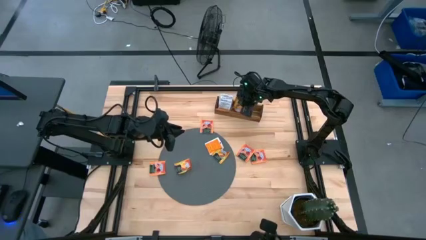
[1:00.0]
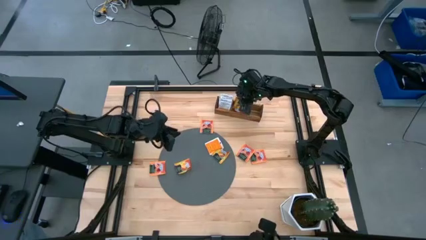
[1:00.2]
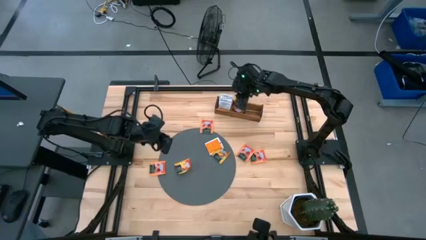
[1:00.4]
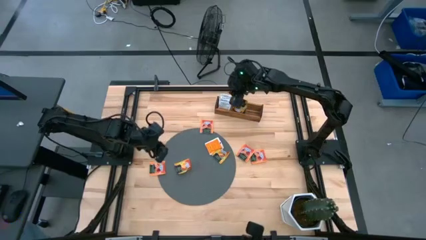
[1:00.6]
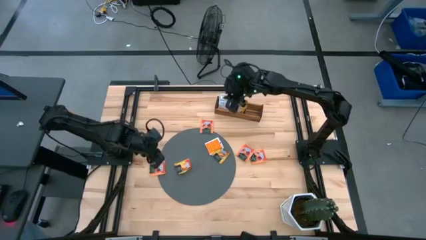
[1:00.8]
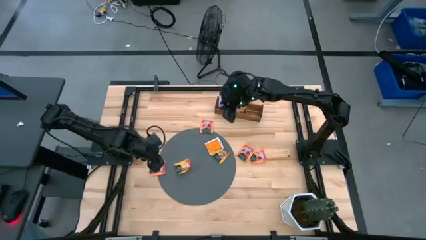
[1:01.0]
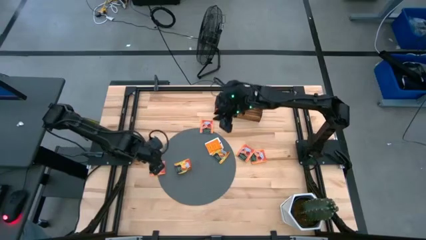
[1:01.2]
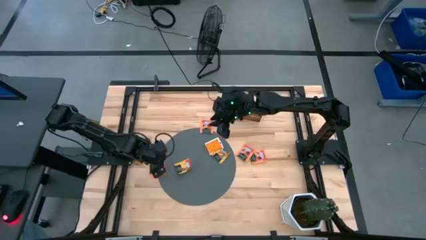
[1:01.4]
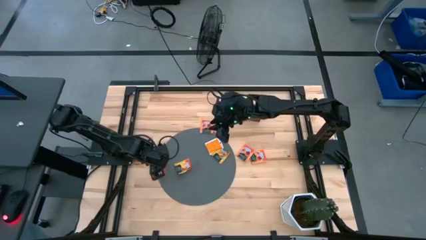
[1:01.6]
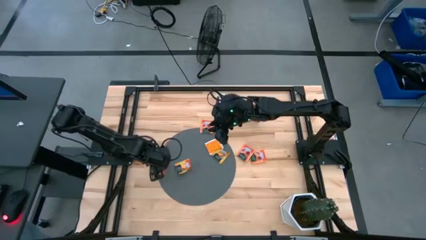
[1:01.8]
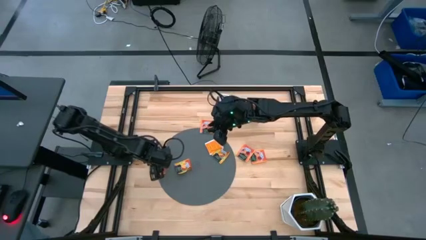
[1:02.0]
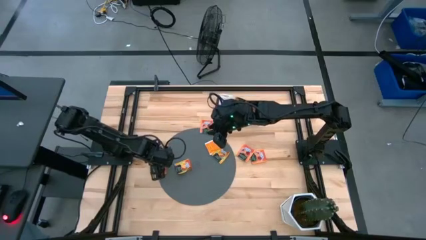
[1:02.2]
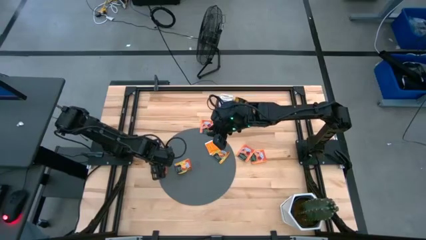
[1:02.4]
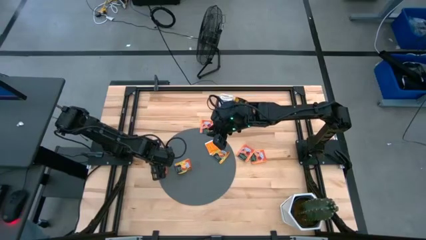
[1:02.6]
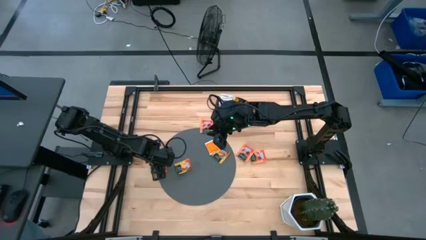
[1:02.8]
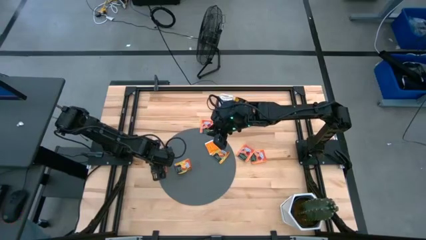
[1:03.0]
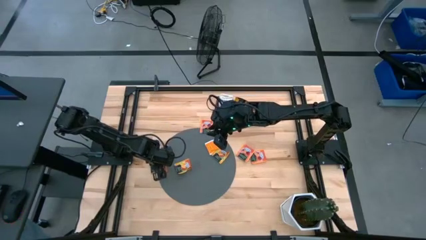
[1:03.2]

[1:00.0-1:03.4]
Task: Pick & Place Tea
Put the orange tea bag into the right section of the wooden organizer

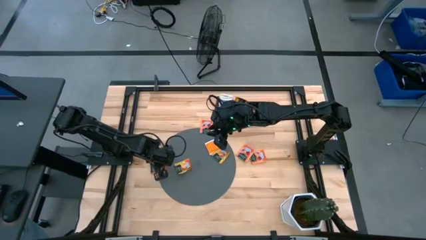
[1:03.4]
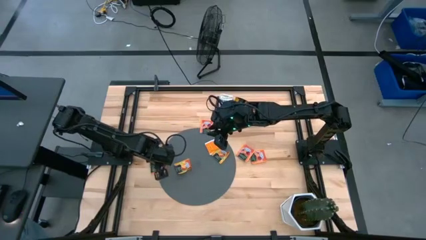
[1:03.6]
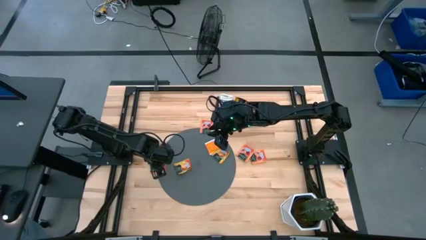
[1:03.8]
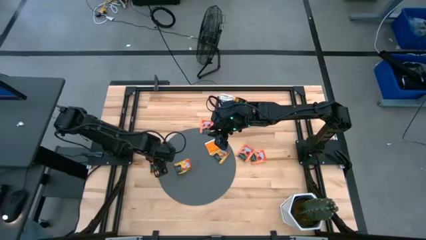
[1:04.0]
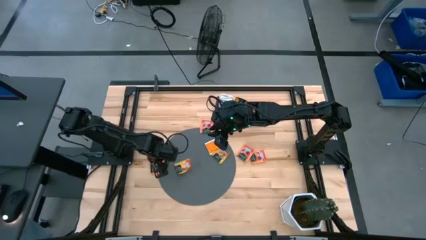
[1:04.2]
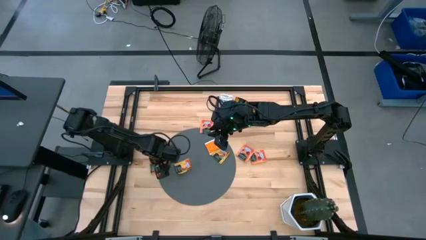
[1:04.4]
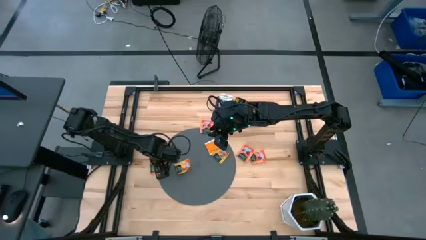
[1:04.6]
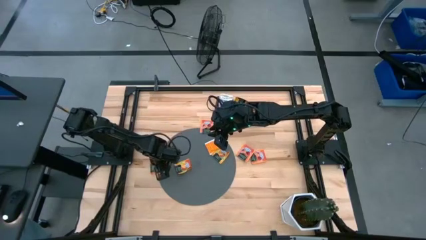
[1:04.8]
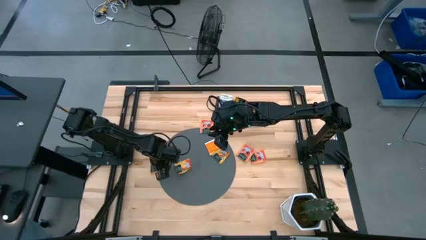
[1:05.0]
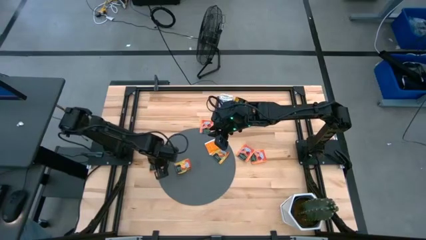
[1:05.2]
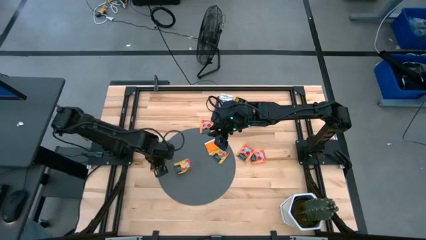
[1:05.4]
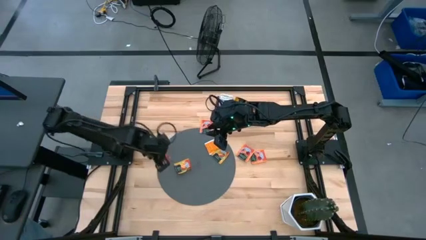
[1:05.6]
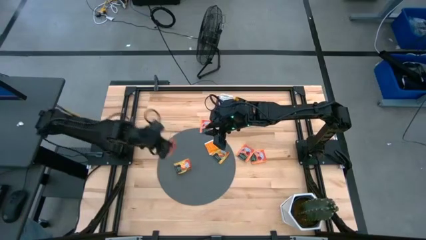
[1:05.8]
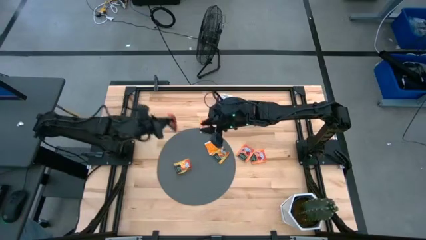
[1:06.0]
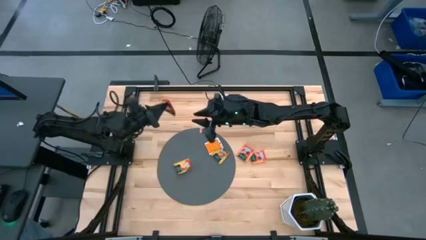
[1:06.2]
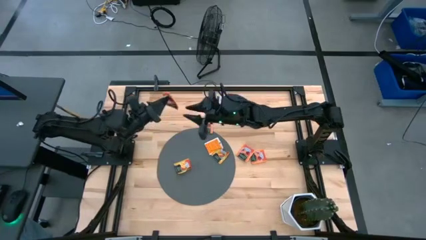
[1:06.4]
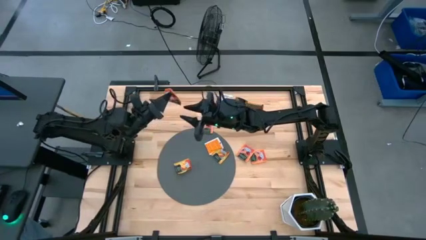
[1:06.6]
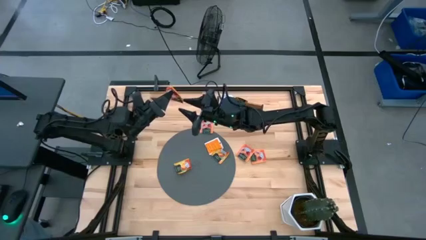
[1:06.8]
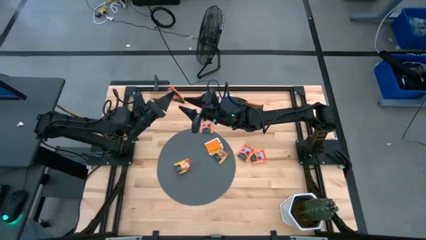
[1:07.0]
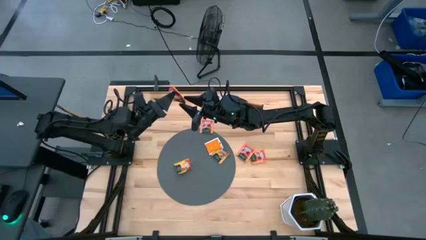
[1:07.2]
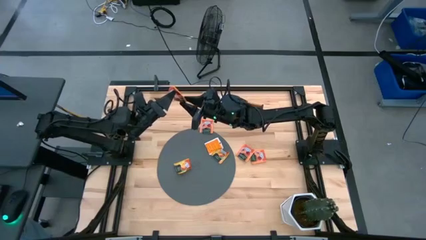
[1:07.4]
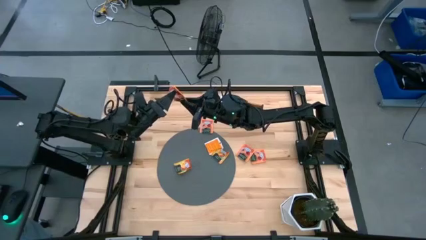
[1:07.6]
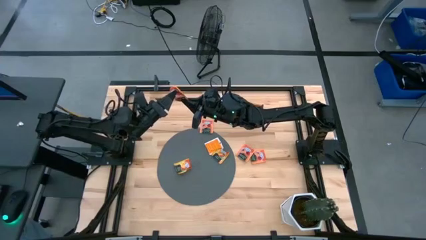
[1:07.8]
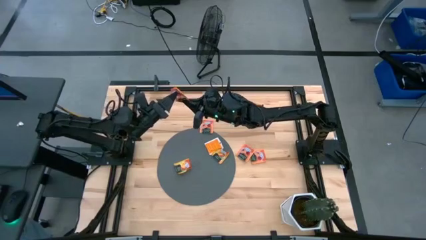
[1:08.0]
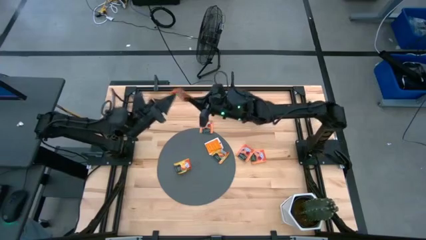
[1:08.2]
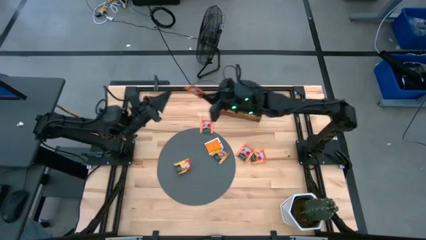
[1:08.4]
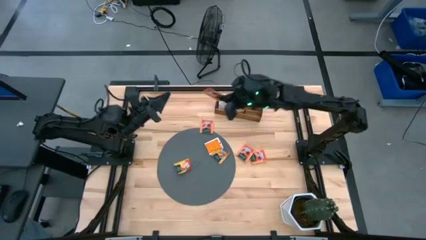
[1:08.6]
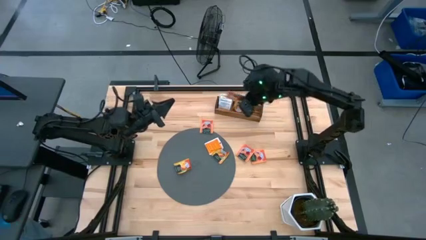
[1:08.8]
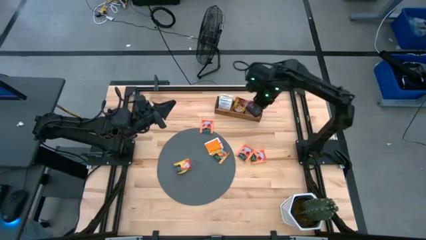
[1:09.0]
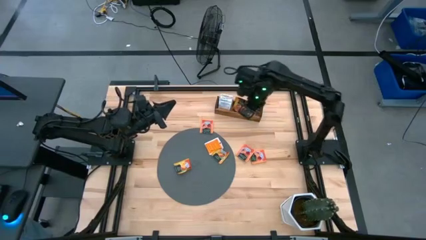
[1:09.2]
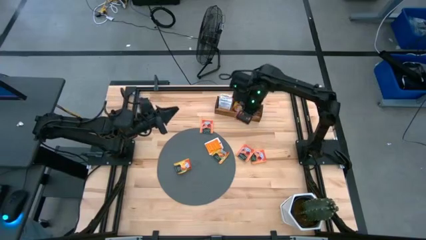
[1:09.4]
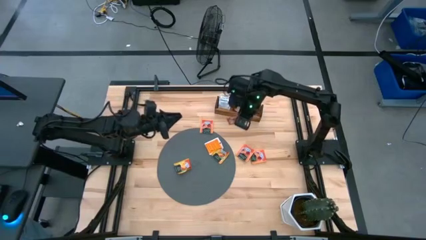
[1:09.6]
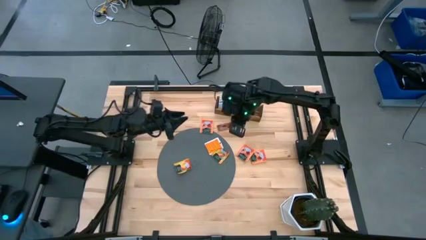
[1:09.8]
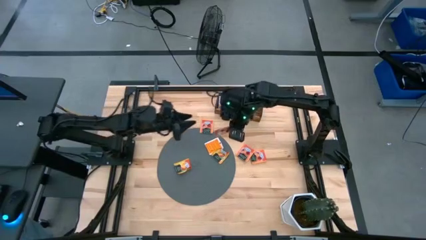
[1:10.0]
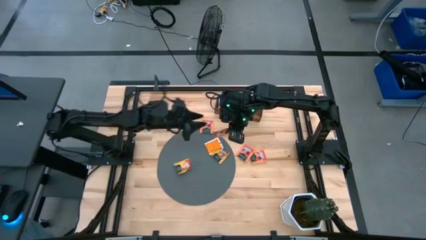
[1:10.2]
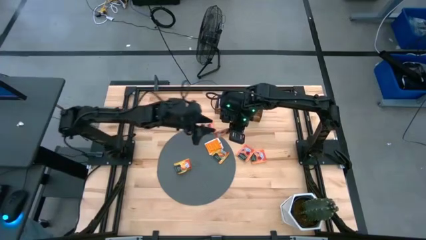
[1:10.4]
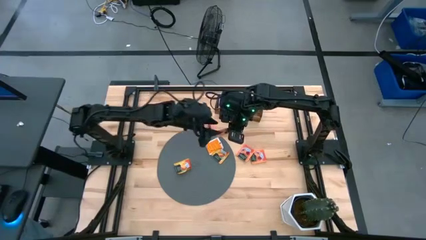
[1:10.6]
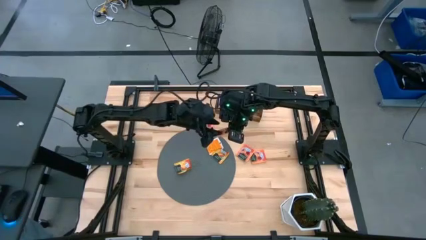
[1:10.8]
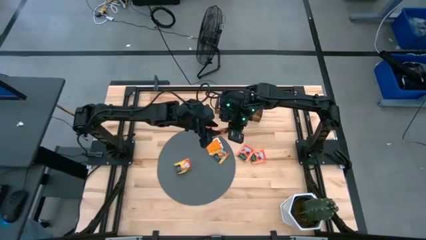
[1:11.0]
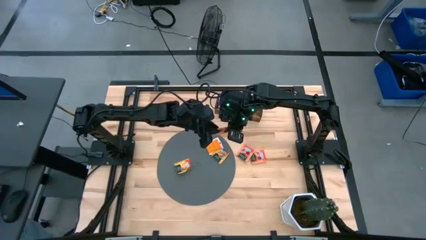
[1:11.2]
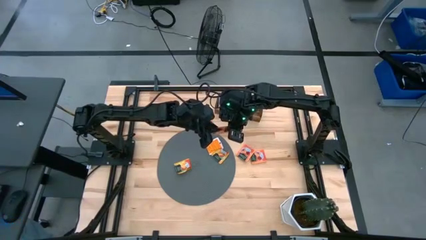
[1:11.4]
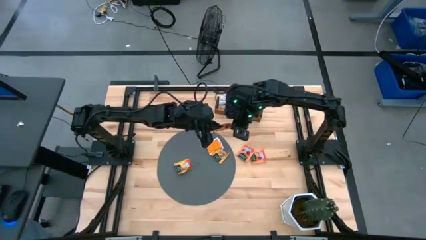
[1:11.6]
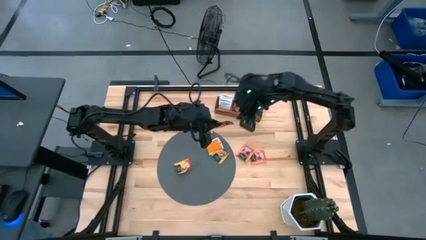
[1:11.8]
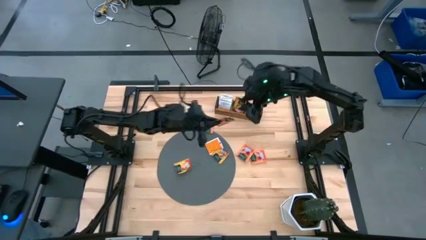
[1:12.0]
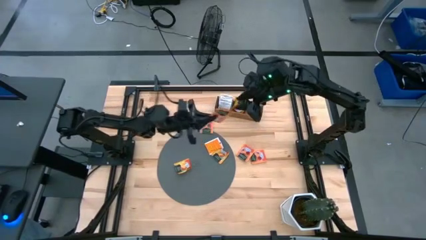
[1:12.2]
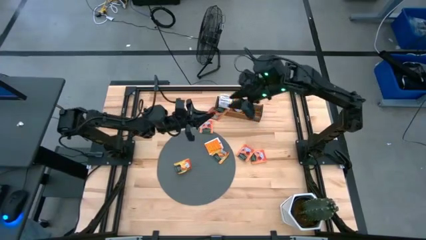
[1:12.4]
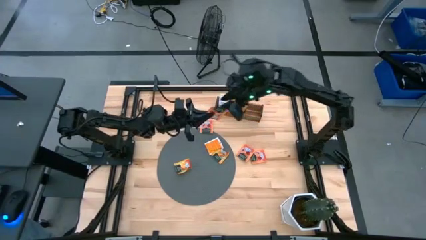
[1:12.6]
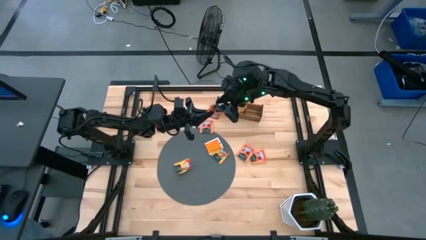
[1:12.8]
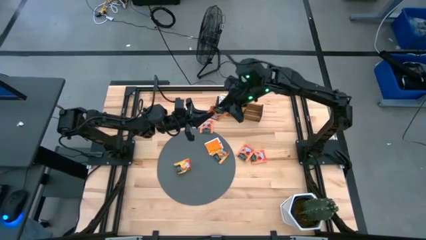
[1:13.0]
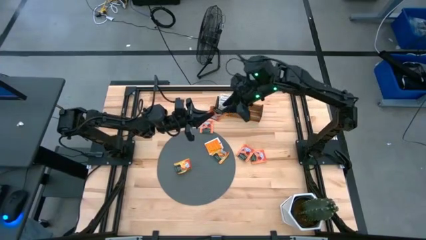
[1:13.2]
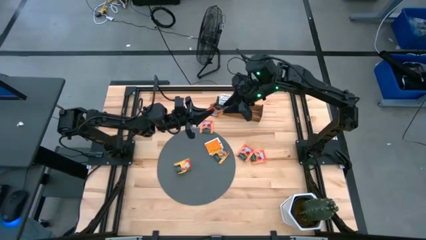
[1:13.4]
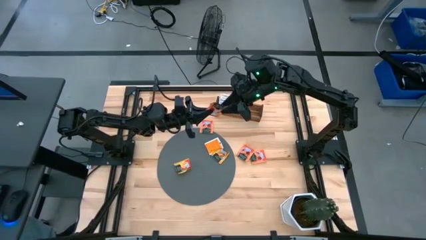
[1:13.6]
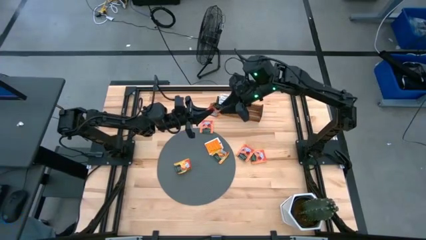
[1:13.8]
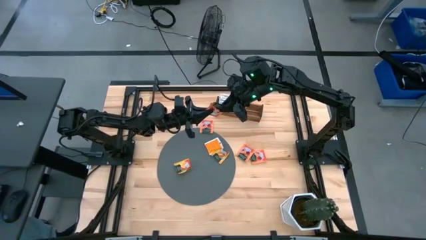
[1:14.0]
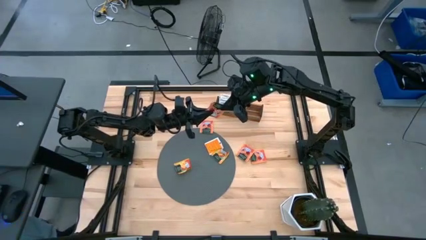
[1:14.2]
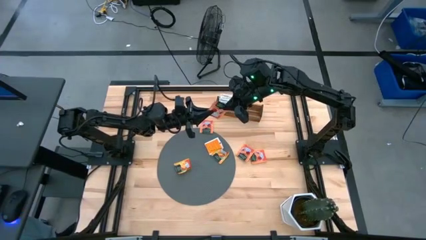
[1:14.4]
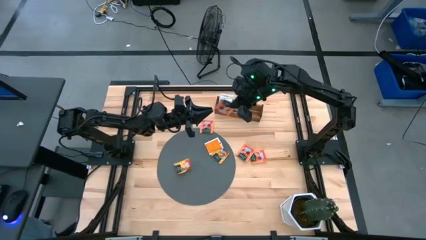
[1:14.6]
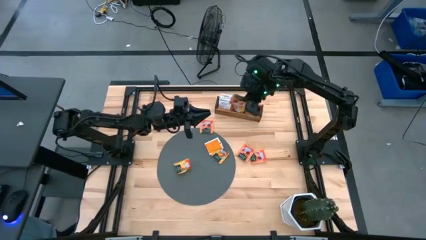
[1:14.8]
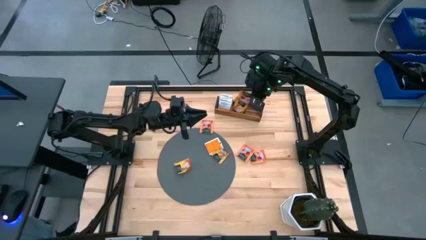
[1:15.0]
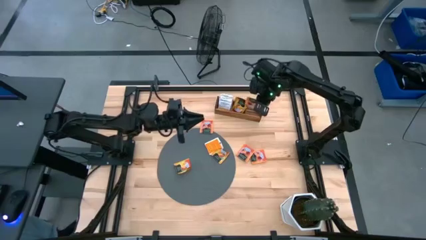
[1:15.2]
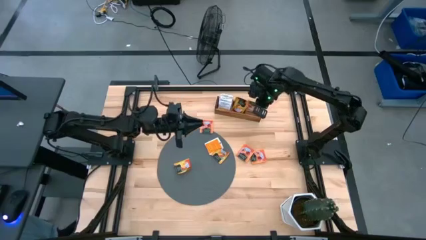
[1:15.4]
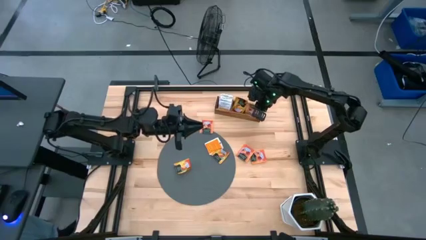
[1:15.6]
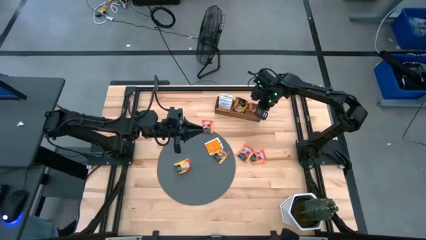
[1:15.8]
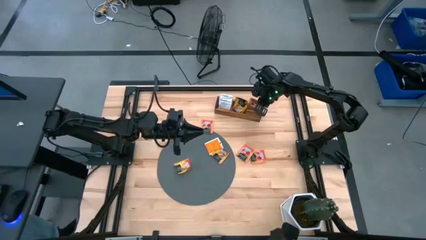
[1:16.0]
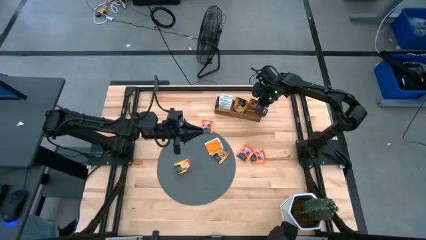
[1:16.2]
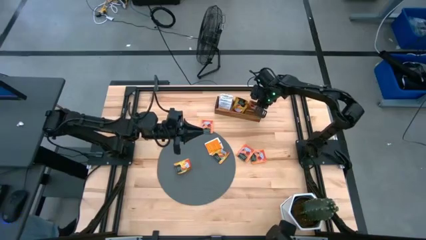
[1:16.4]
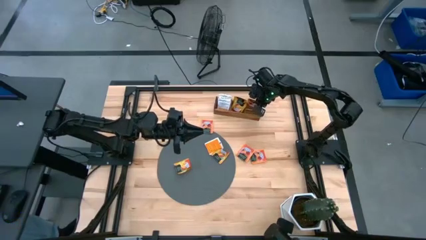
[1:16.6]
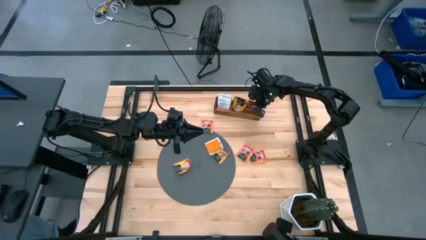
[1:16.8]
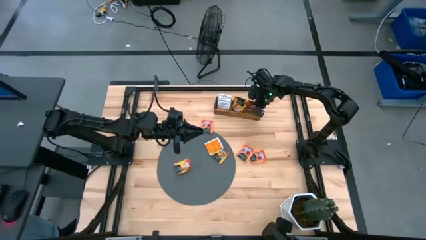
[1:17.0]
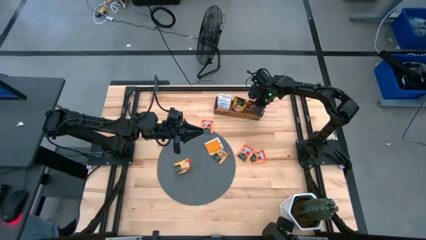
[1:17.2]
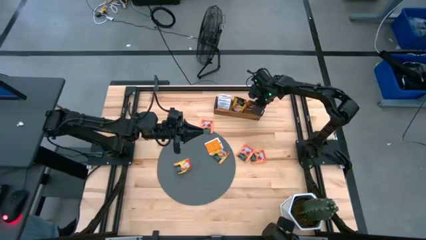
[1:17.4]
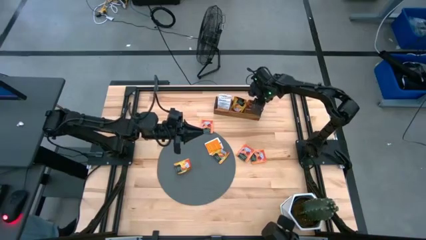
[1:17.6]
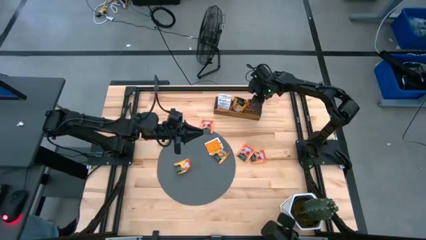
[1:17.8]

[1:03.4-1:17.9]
Put the orange tea bag into the right section of the wooden organizer
